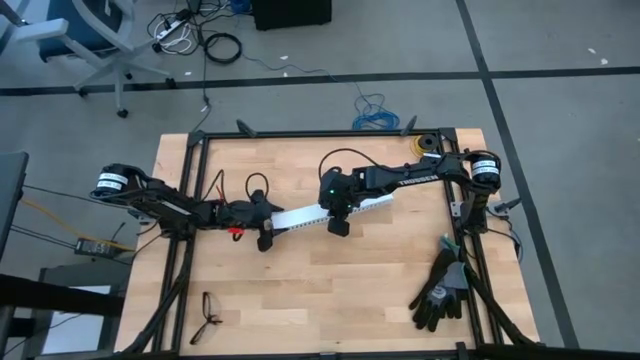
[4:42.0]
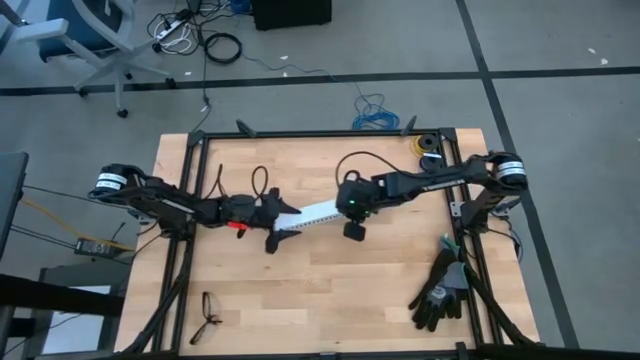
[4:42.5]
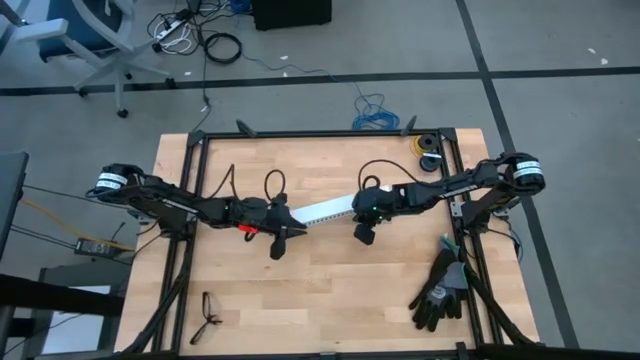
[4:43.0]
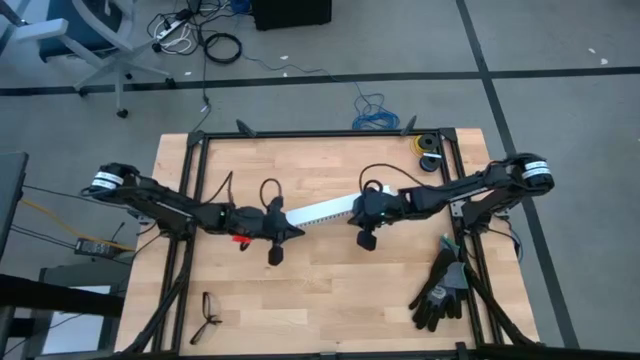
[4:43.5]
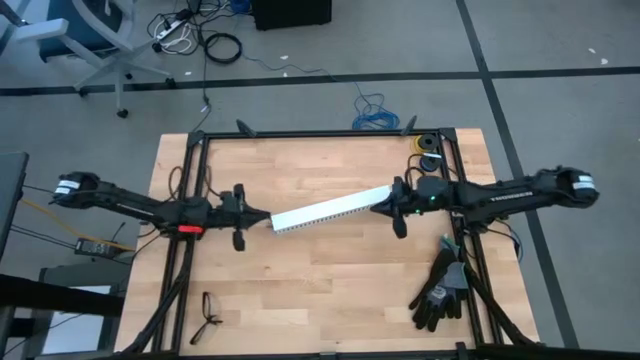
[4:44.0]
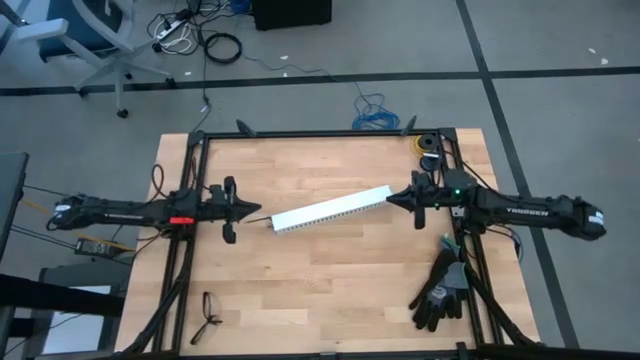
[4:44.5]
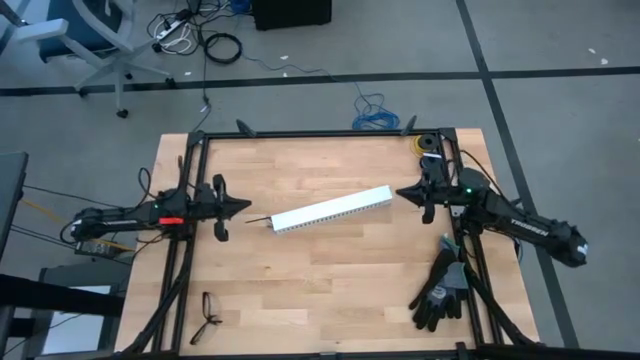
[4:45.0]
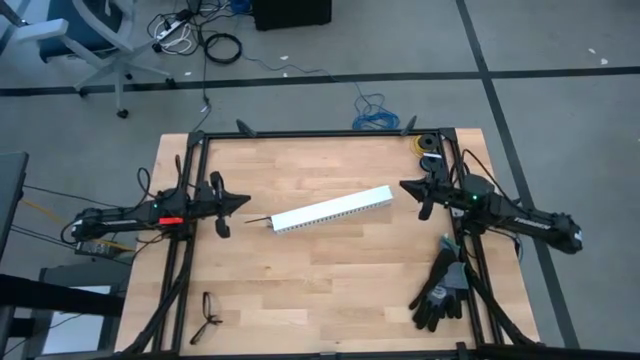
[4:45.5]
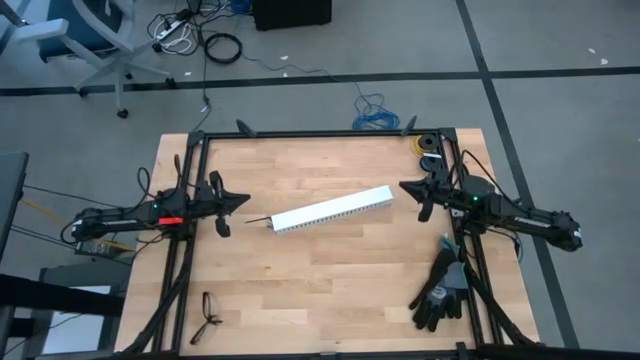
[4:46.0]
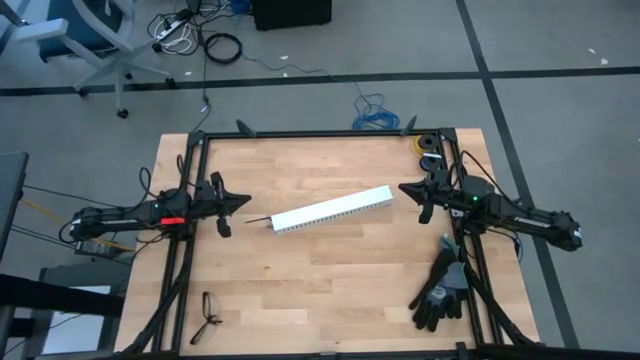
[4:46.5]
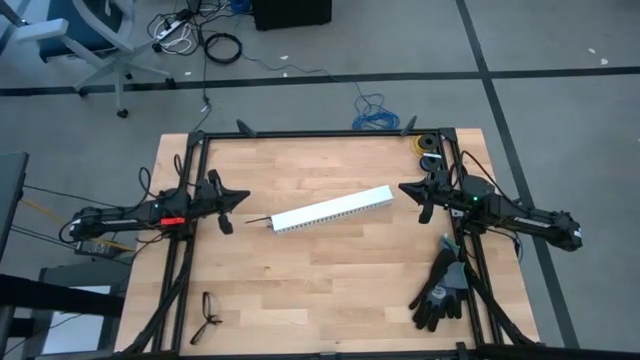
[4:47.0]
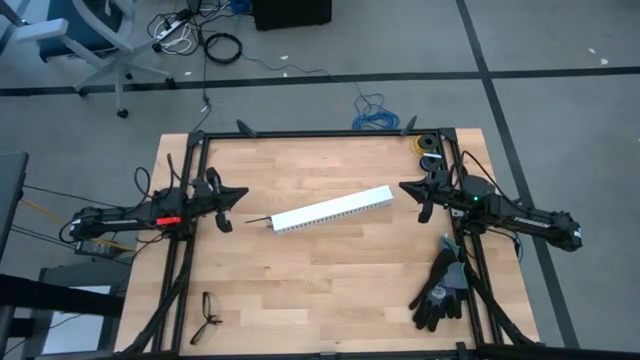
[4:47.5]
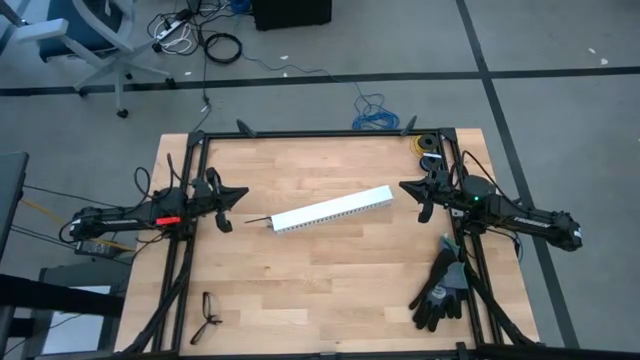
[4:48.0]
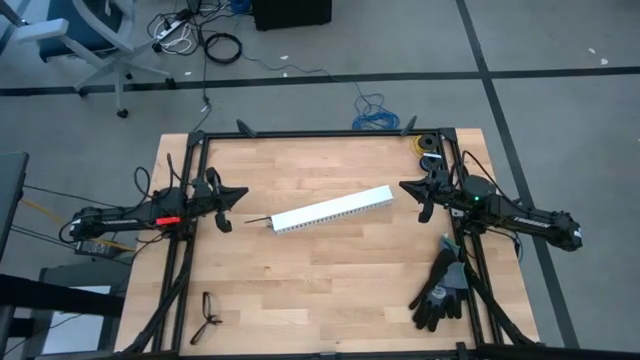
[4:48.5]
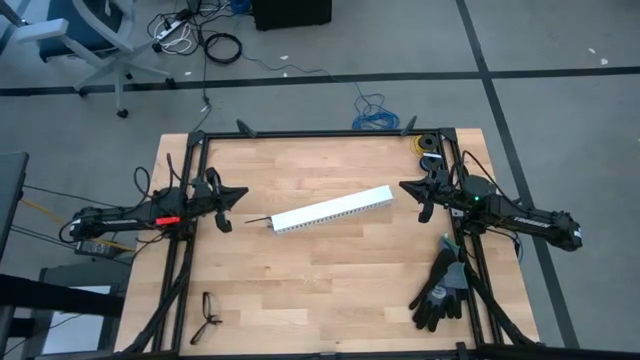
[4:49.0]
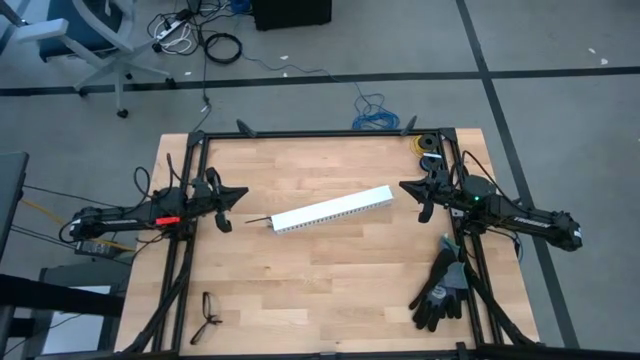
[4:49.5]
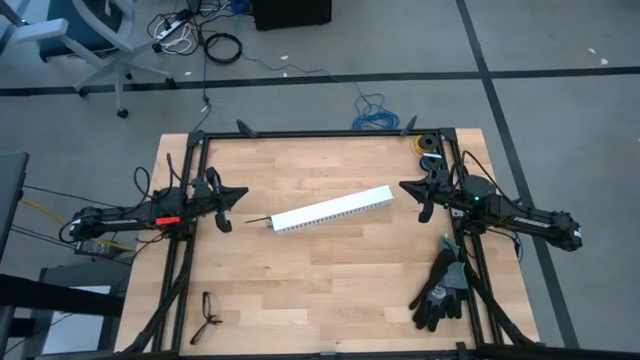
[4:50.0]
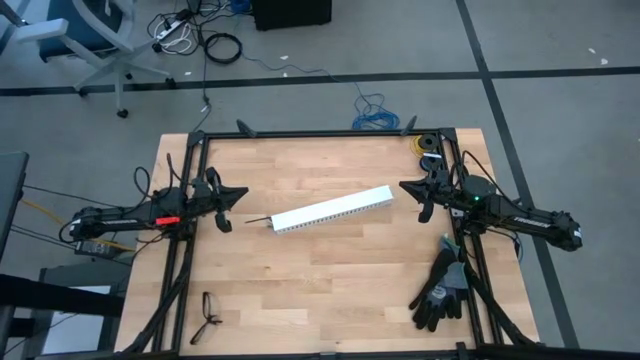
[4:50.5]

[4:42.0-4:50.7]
Task: Ziptie cables
Return to Home Position

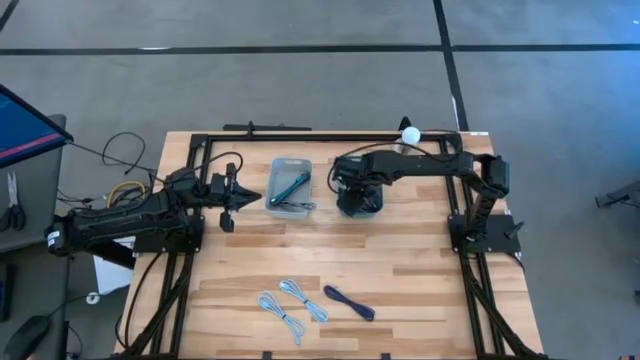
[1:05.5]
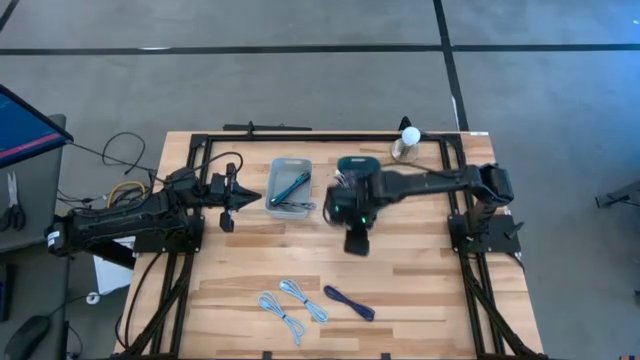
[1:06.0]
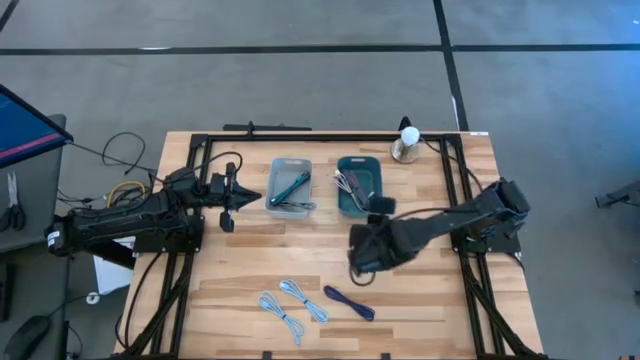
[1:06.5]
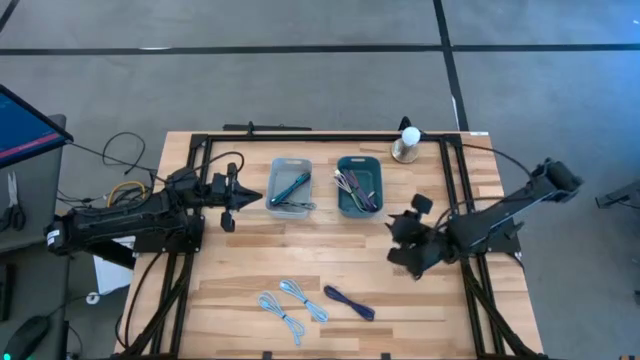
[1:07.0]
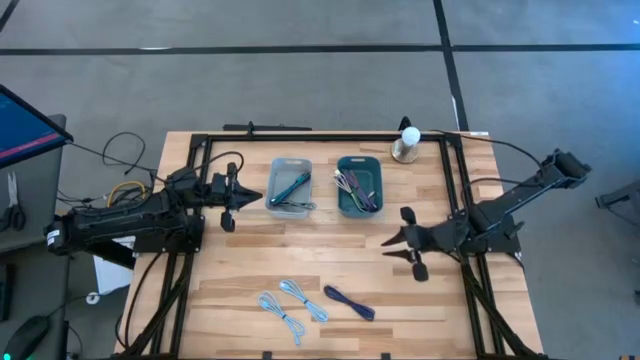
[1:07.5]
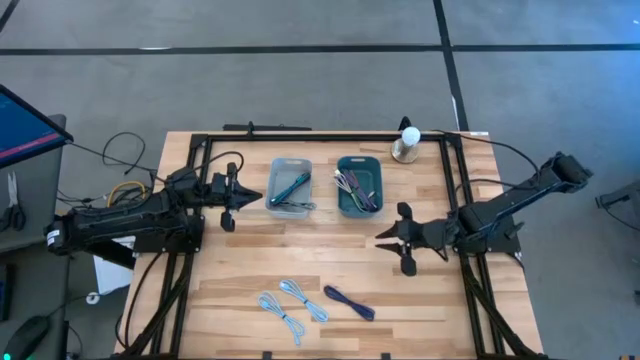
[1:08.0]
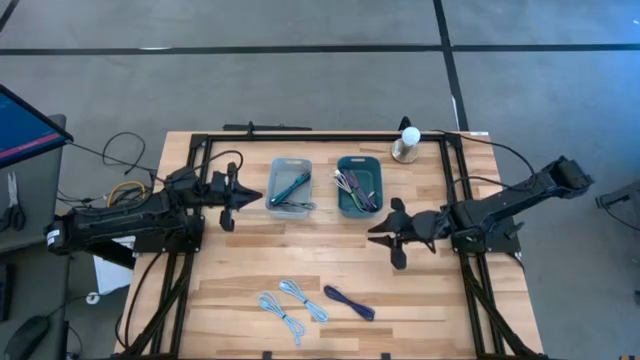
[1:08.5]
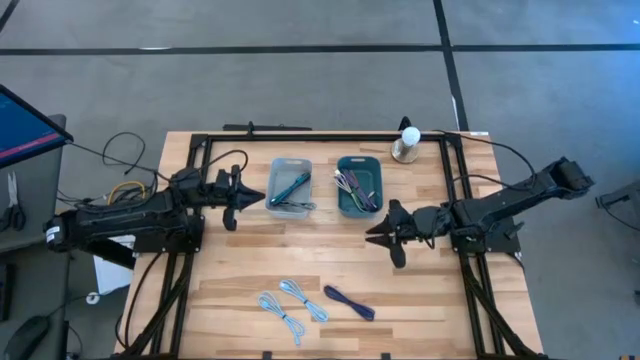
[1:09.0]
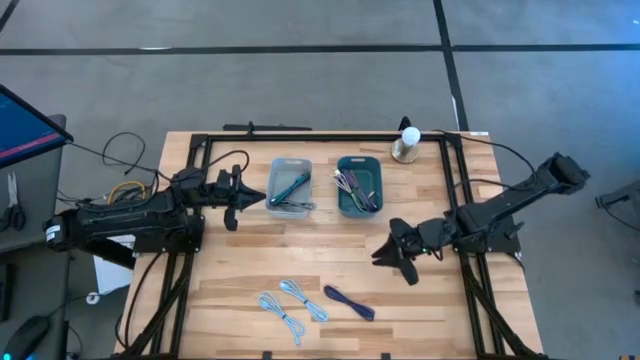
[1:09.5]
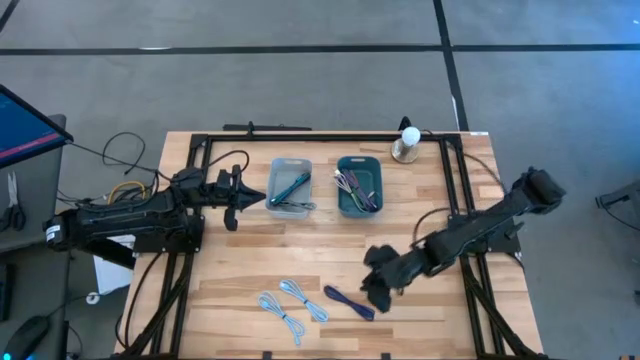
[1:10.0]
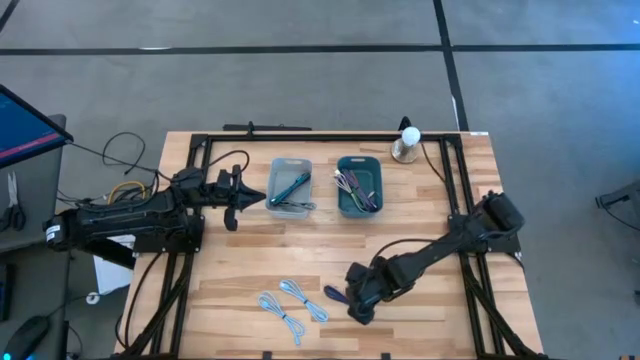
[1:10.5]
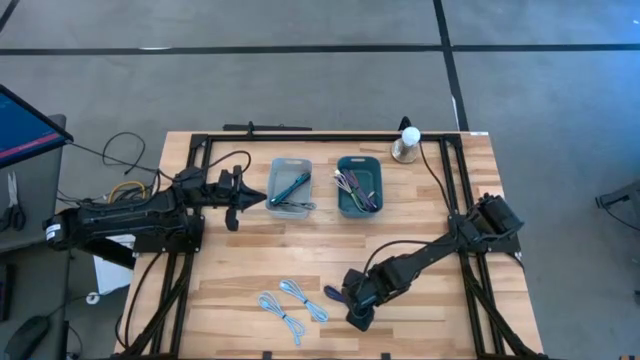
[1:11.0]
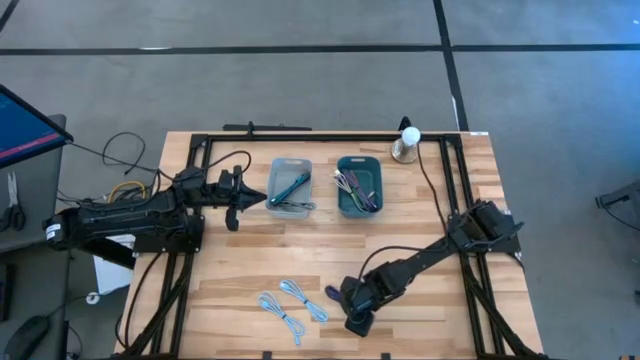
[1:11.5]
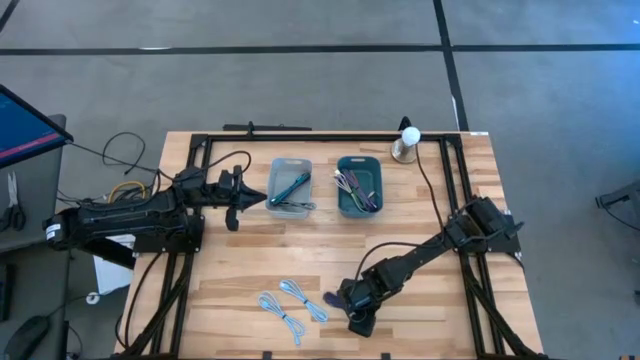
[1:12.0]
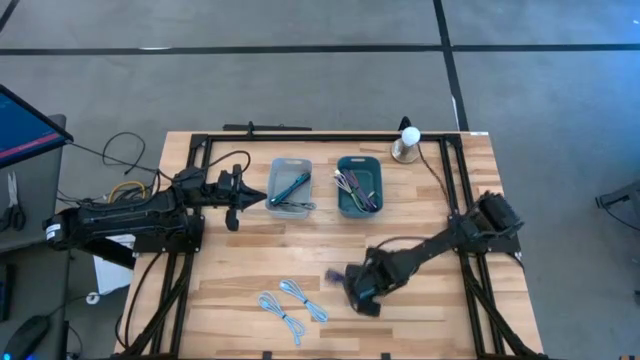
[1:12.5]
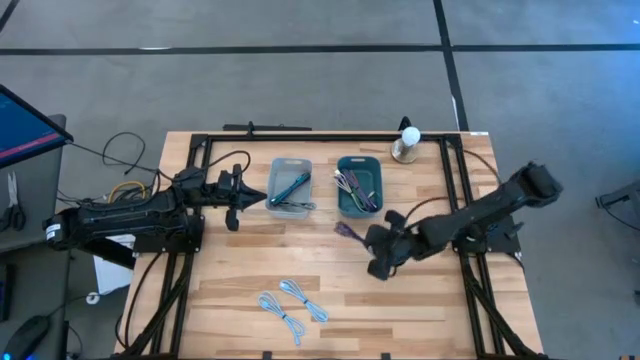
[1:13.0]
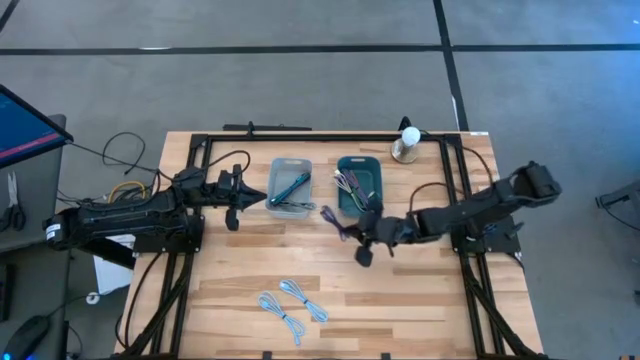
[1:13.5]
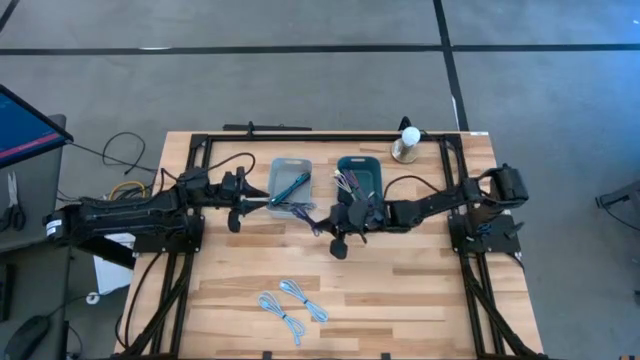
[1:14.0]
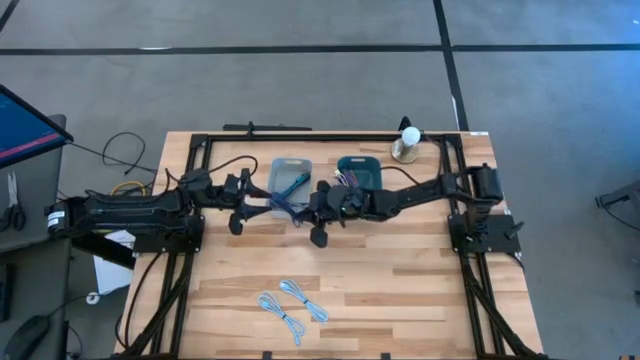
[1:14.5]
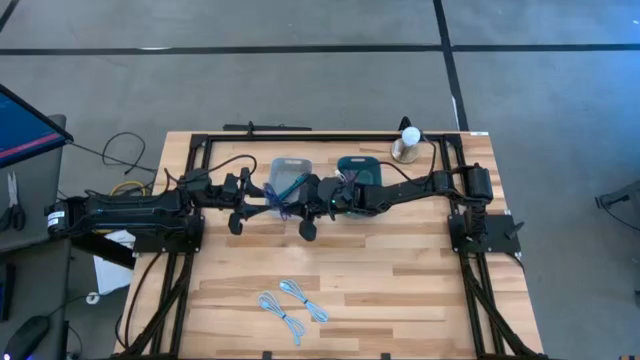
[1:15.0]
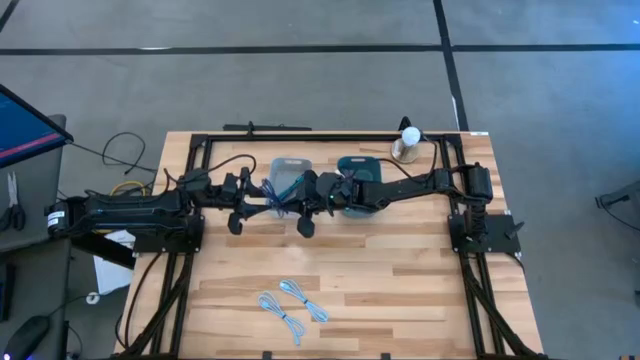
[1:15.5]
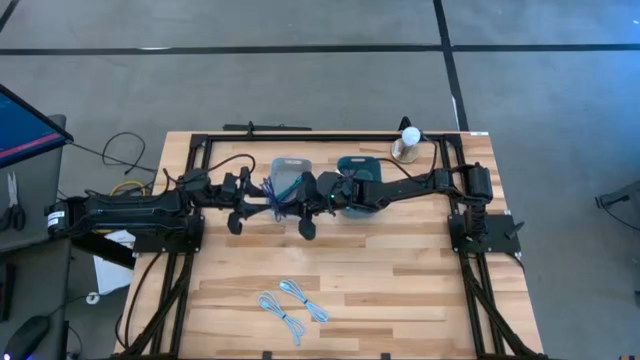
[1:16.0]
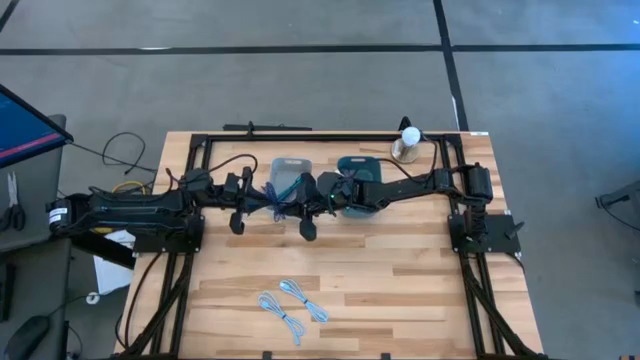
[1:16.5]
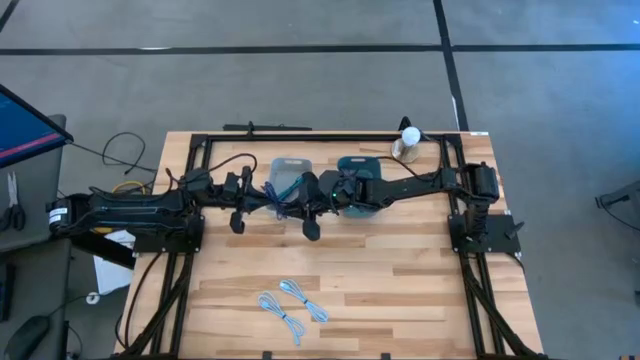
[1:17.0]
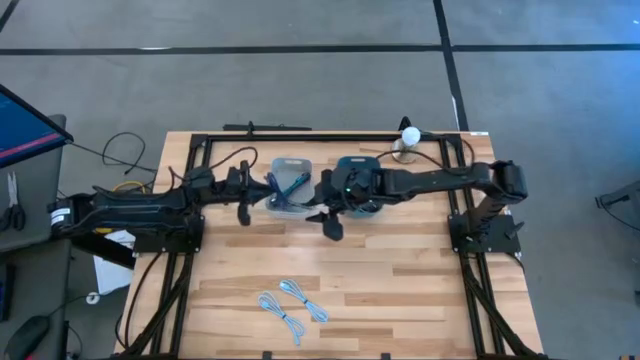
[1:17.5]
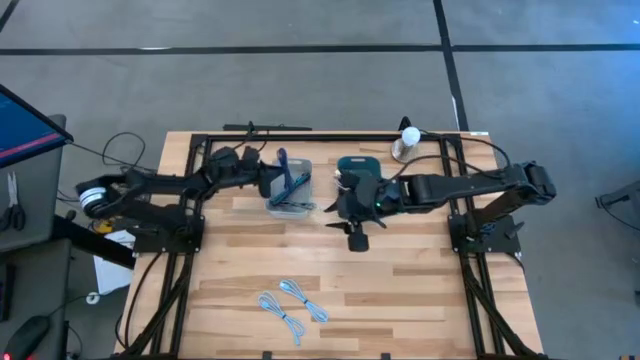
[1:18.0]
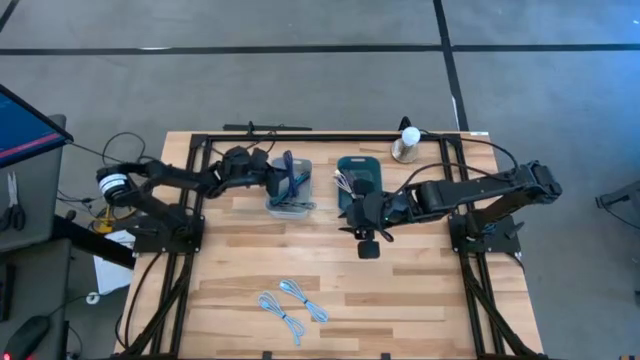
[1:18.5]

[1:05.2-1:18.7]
Task: Pick & Place USB Port
Put the purple patterned charger cable into the white bin
